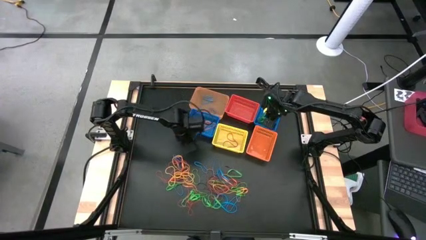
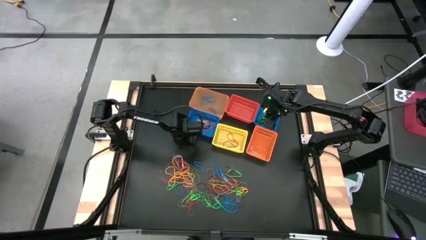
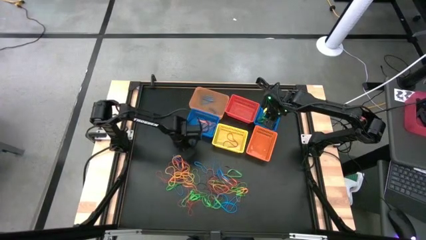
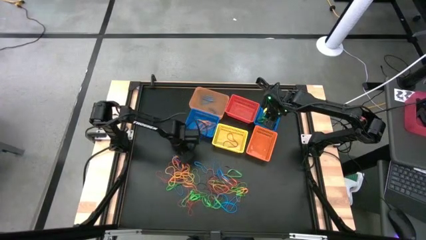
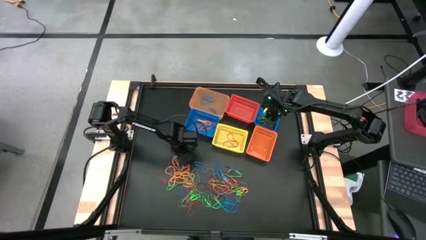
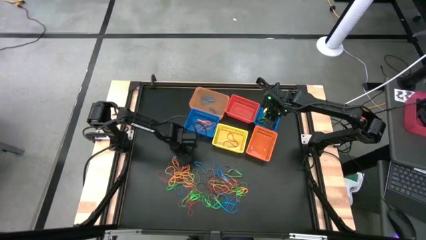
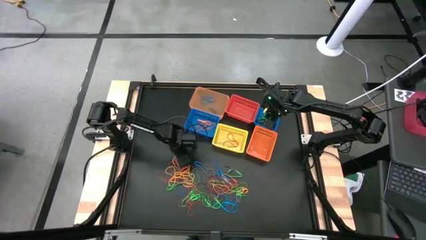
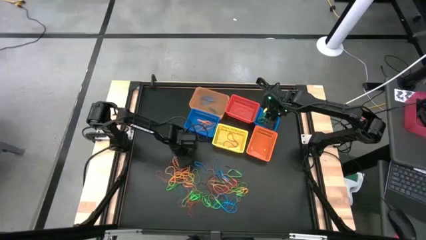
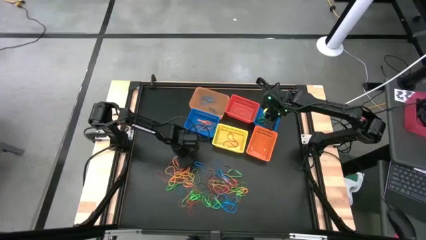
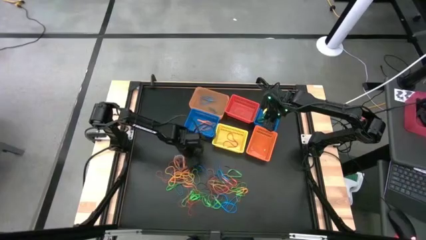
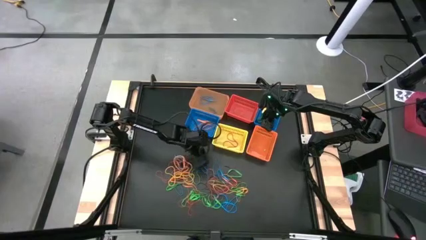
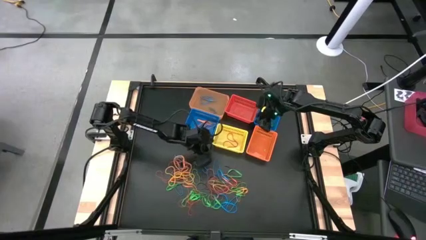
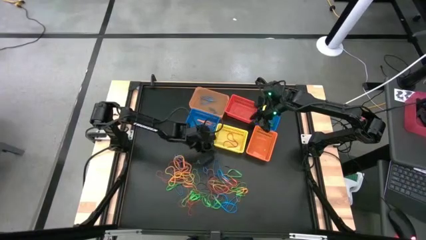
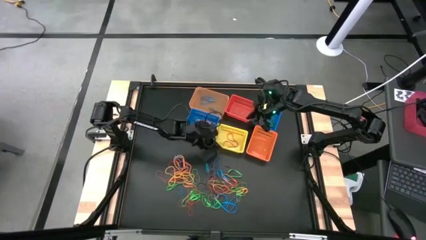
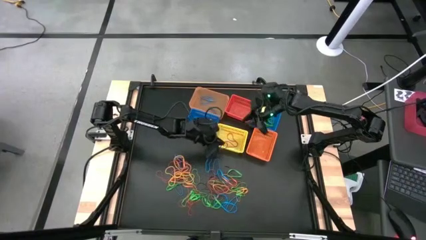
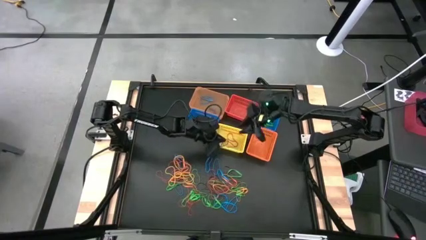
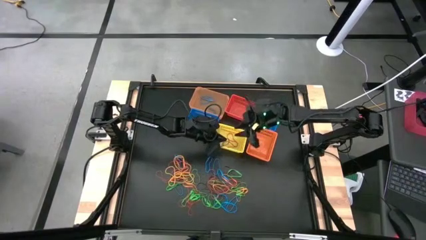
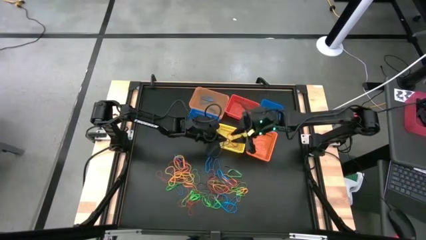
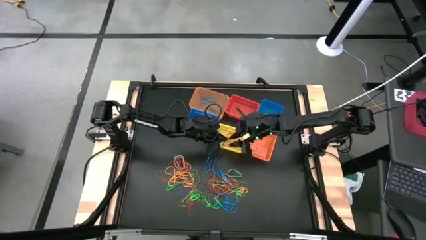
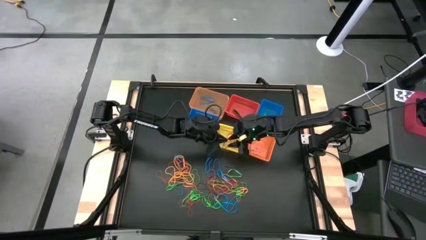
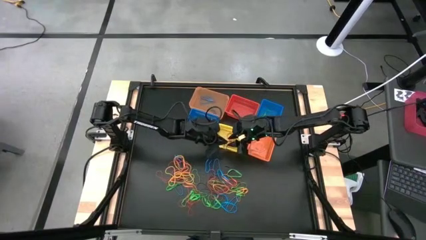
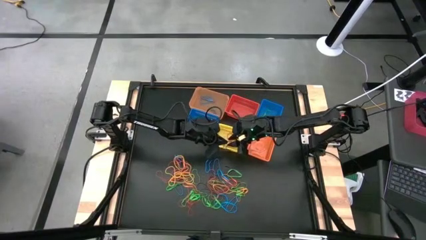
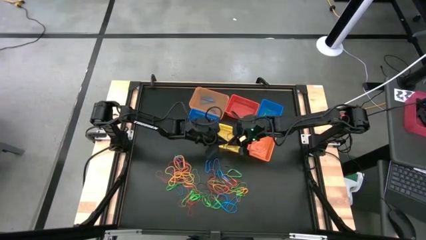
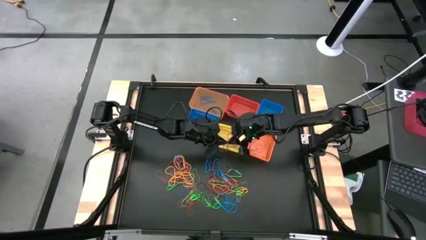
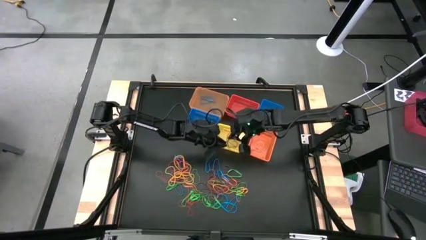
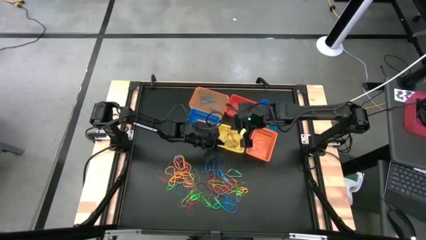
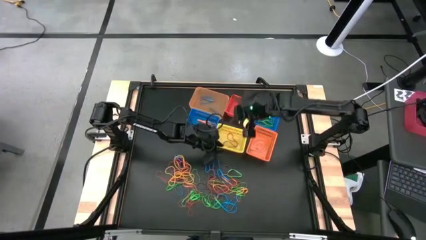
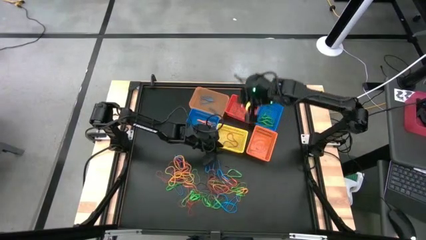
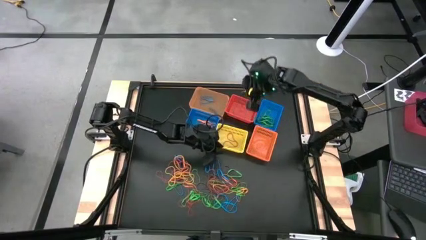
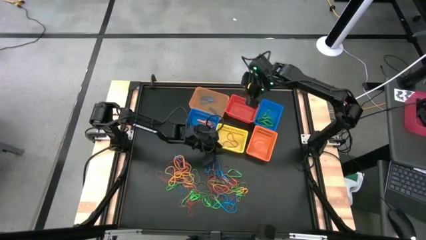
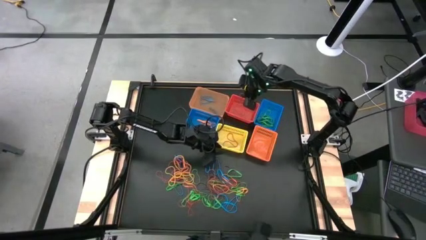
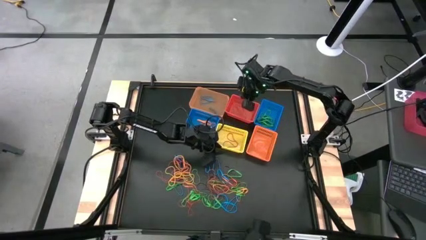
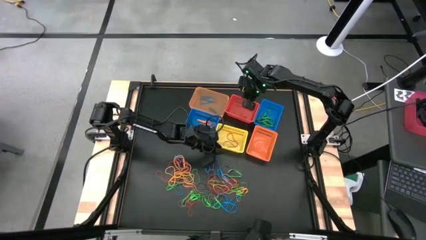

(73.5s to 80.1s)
Task: Sort rubber bands into baskets
Put the violet rubber band into the pink basket

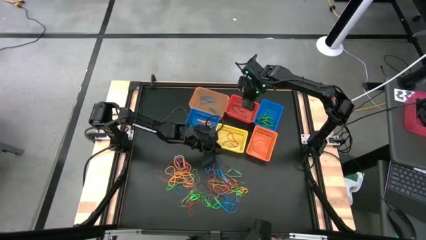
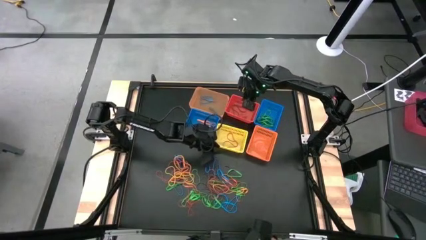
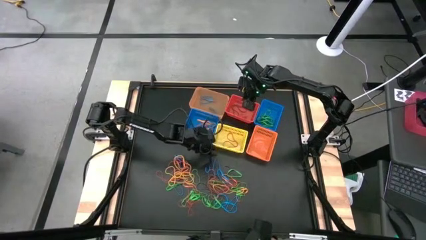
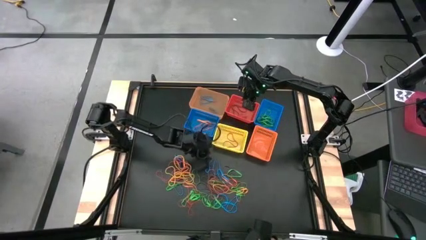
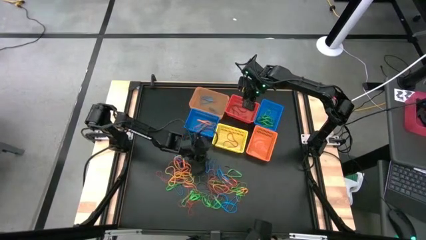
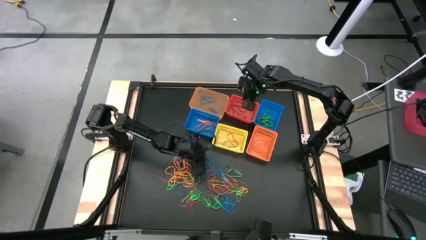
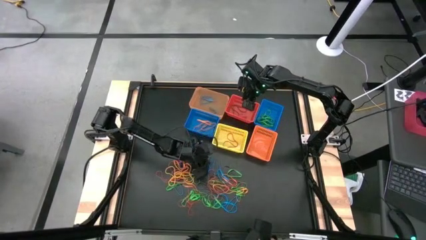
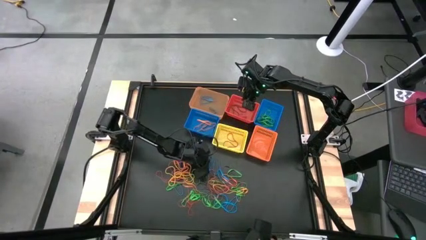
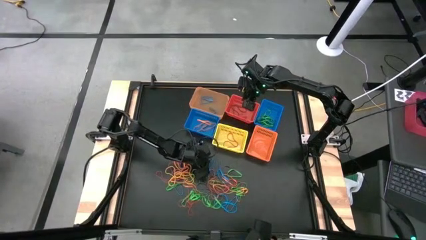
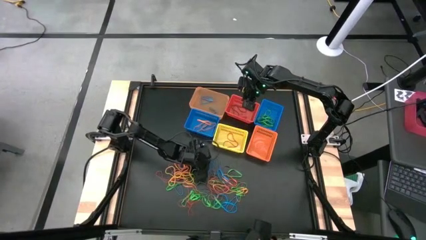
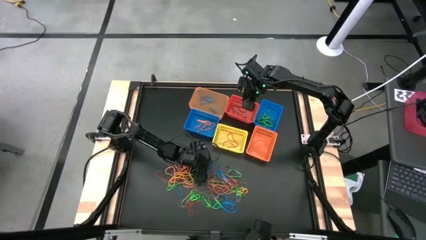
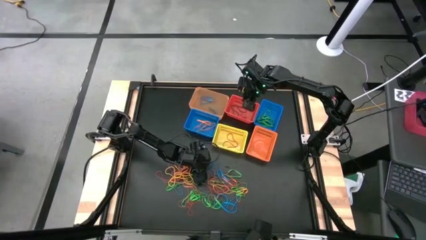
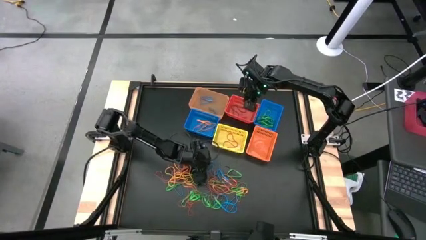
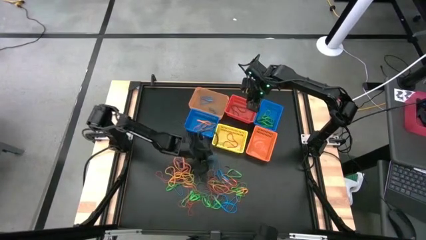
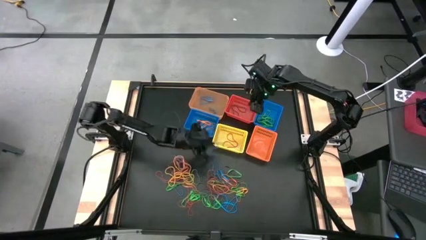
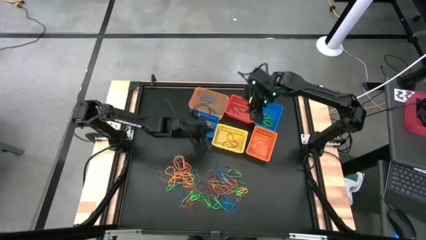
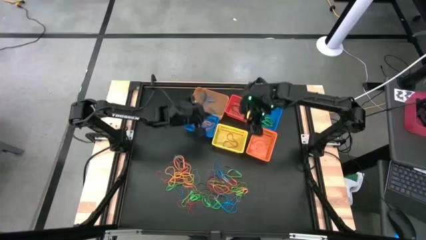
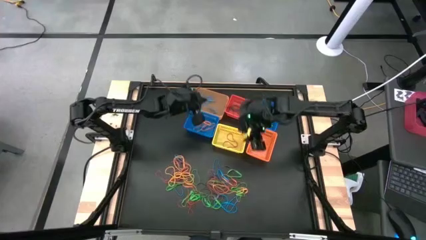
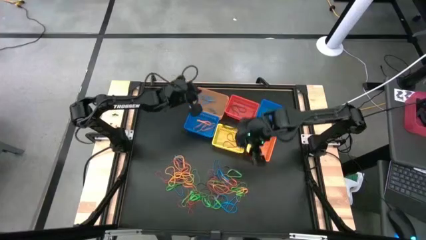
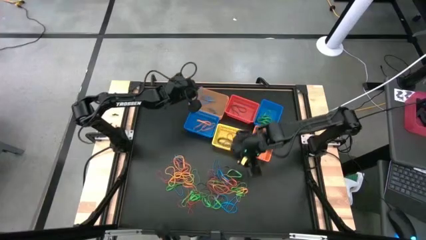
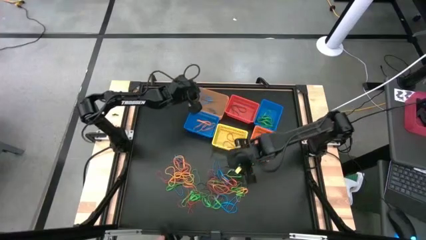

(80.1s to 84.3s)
Put the blue rubber band into the transparent orange basket

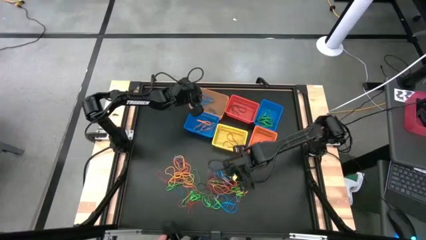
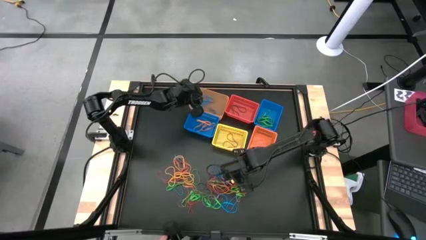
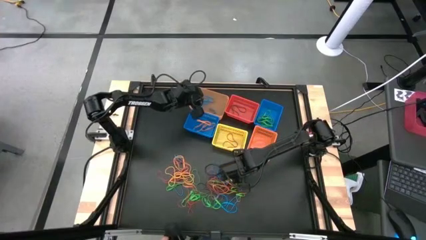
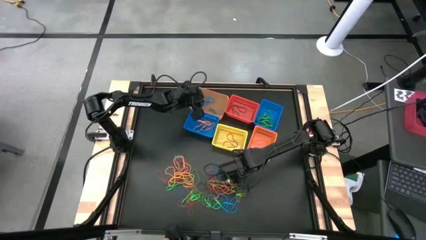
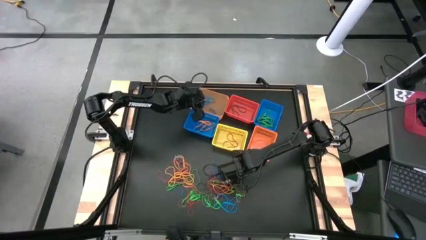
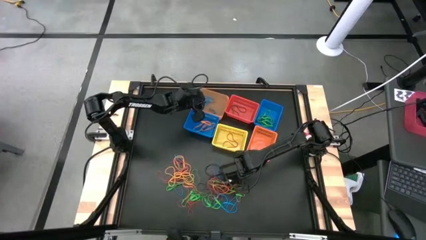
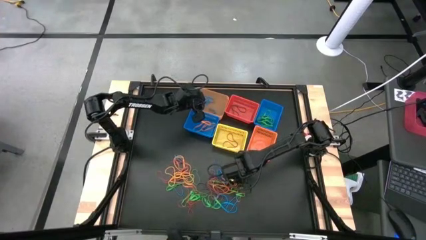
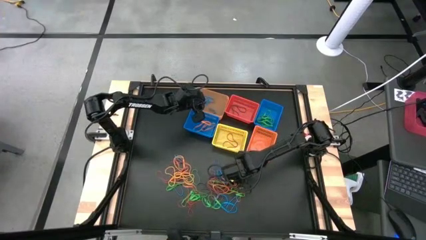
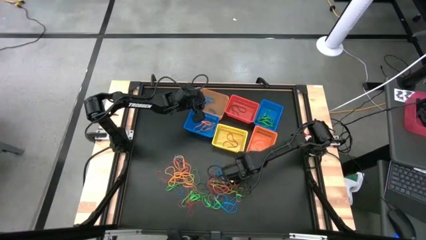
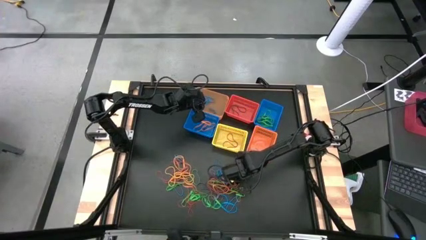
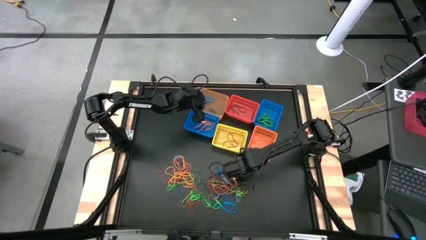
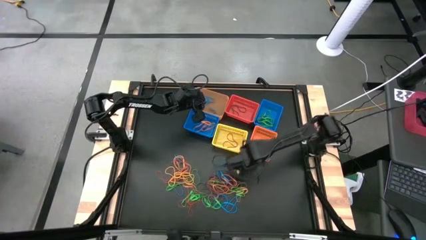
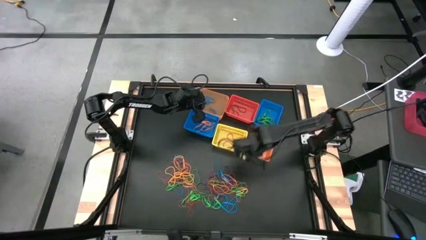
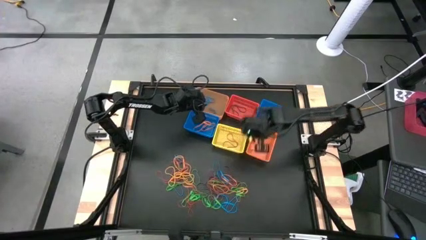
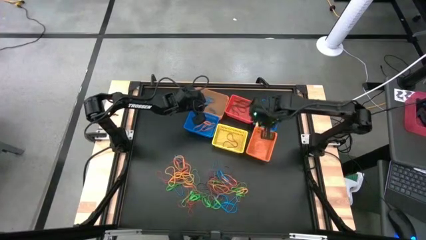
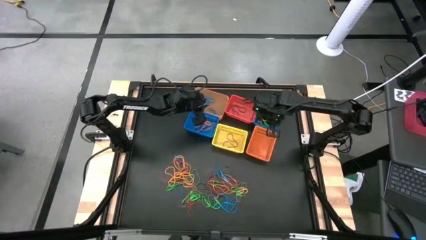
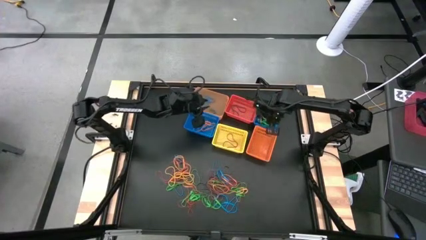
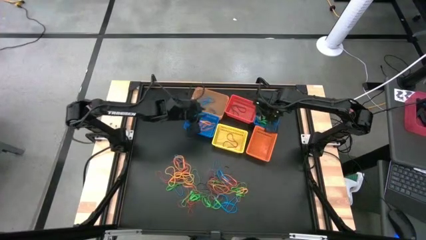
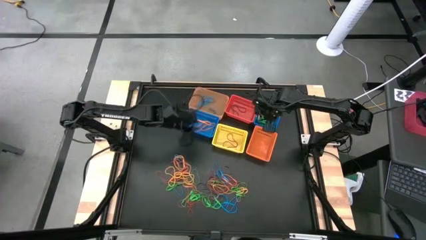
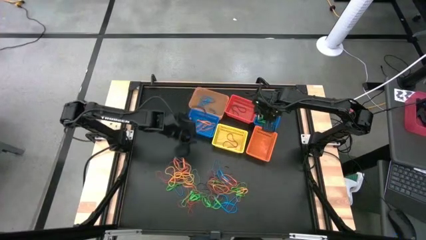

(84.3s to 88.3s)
Put the green rubber band into the right blue basket

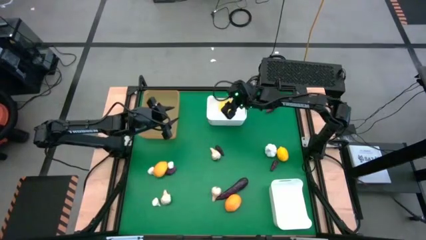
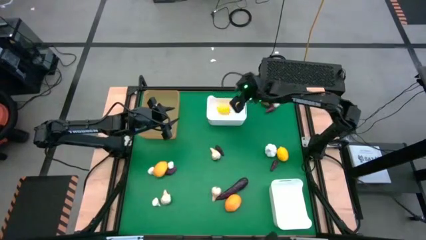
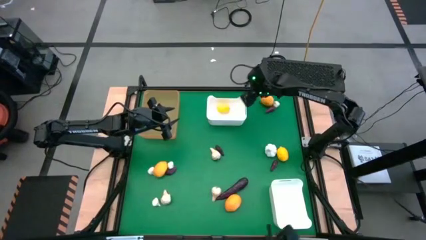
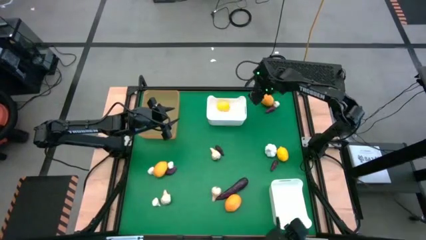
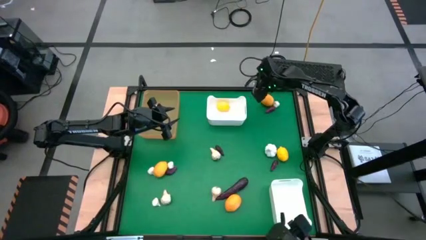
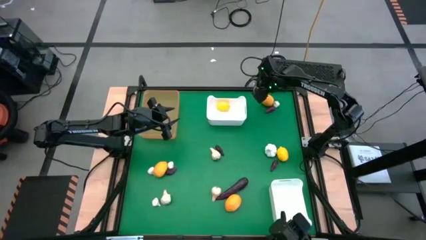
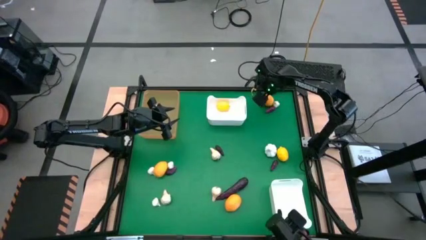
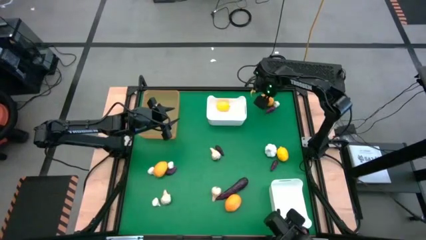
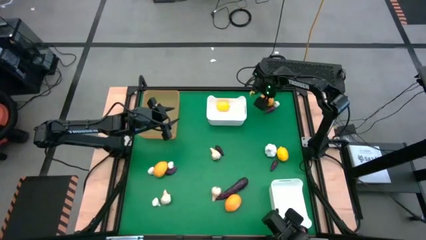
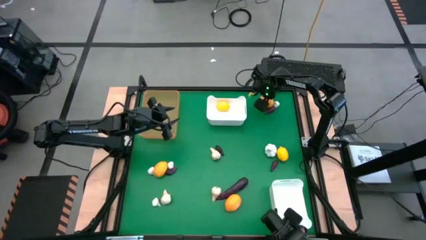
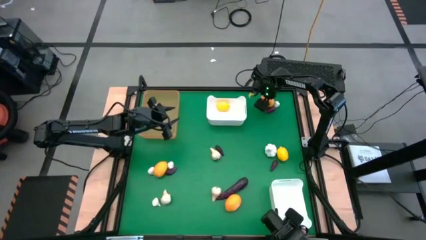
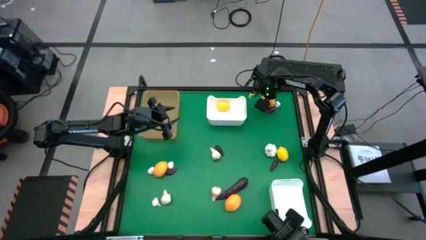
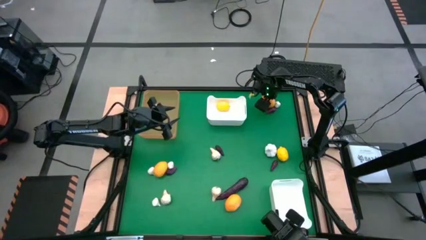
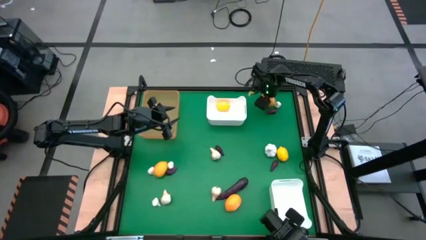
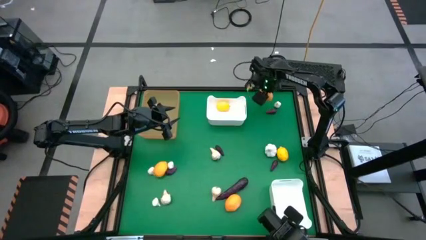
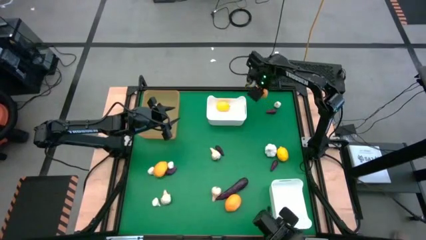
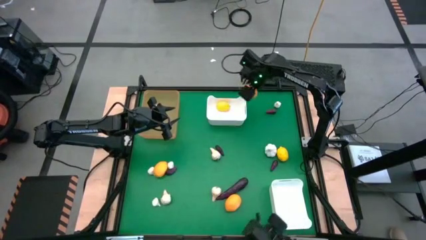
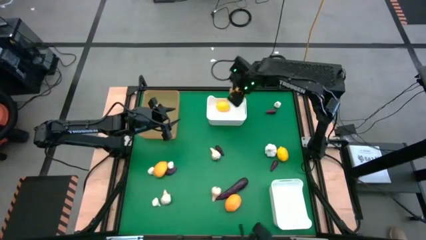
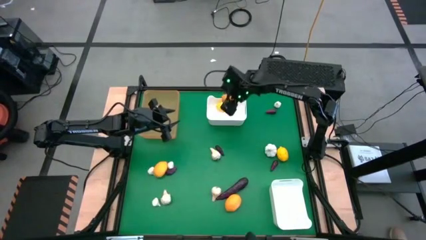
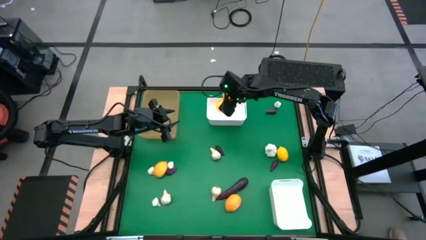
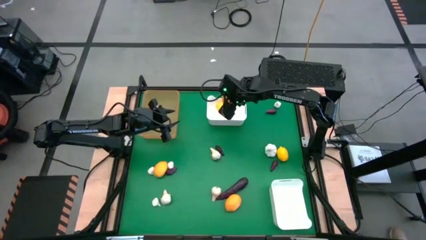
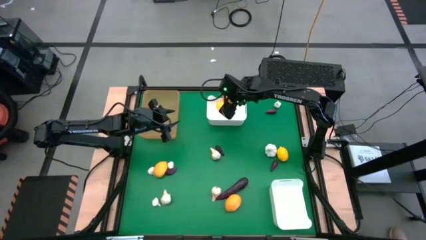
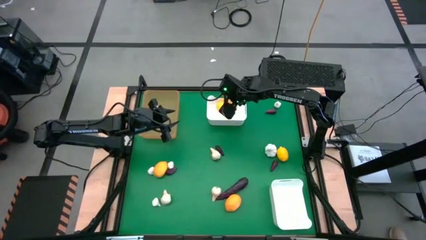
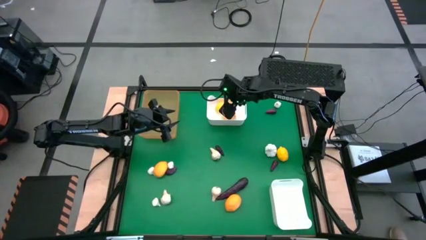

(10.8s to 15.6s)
Task: Sort produce into baskets
Put the lemon into the top white bin
